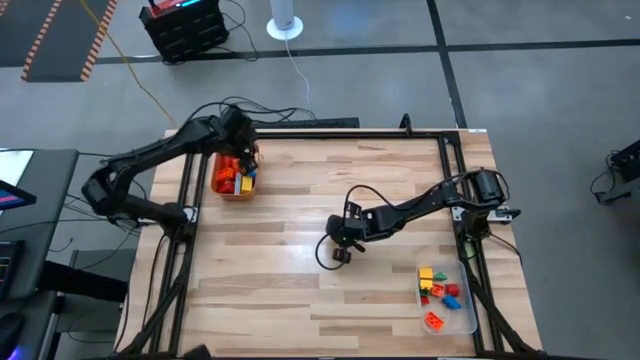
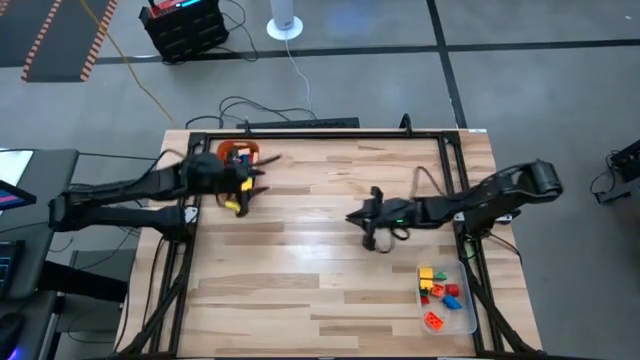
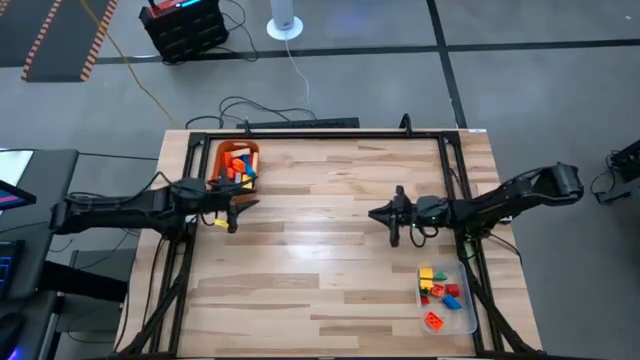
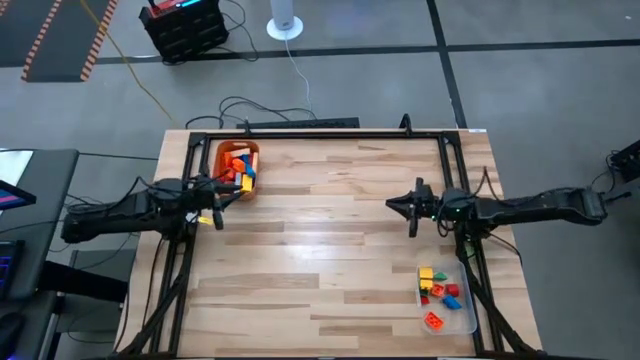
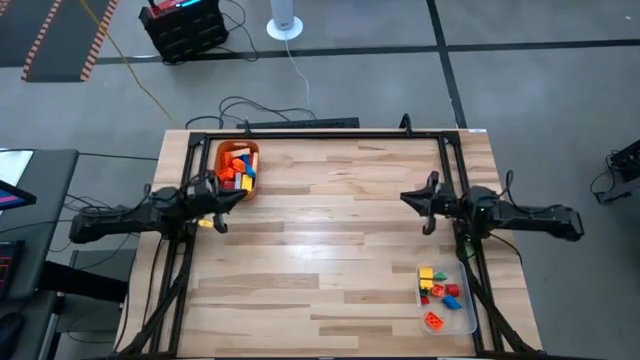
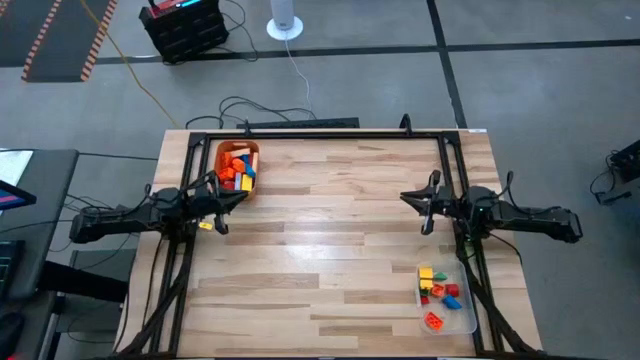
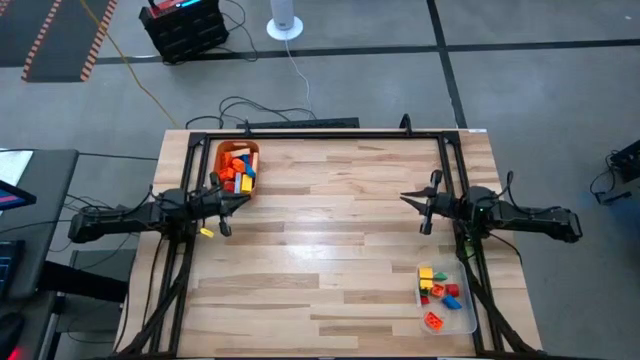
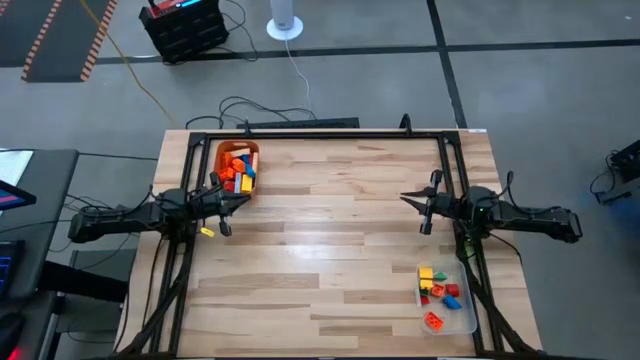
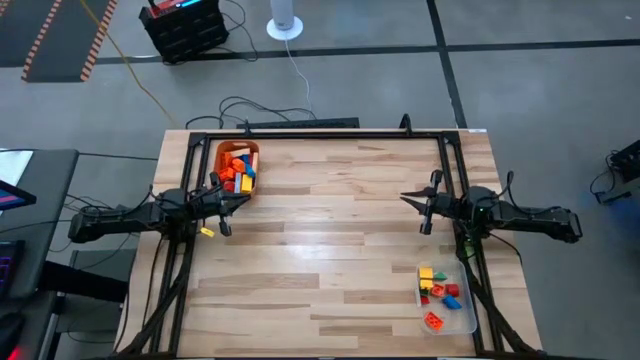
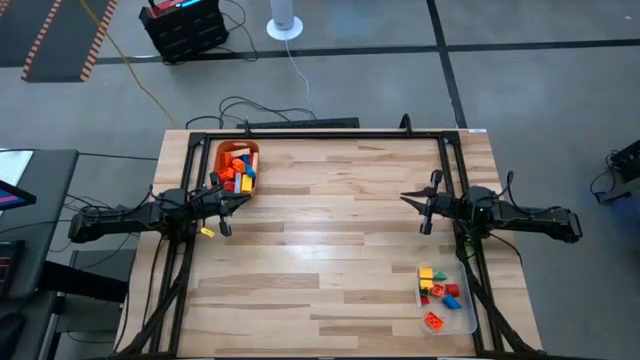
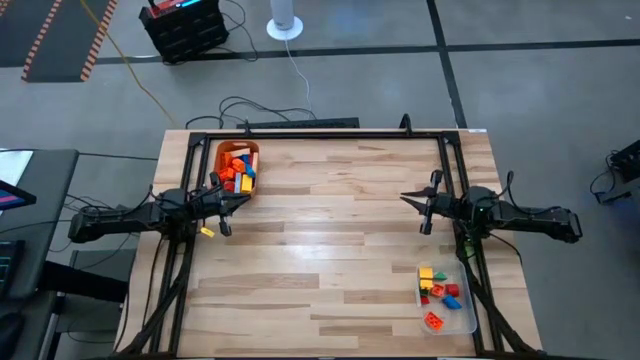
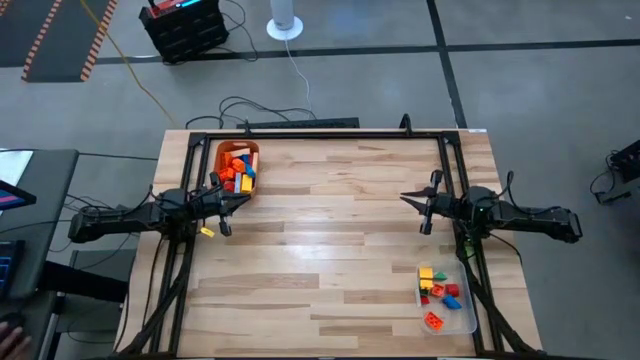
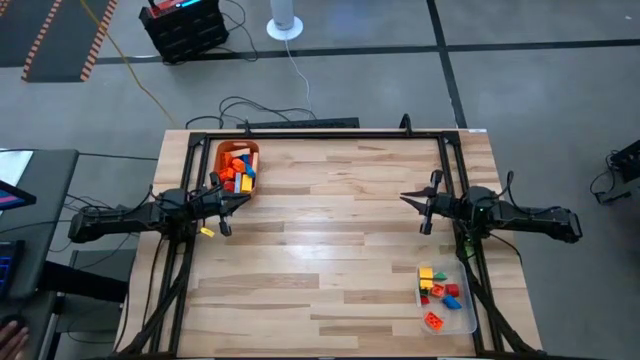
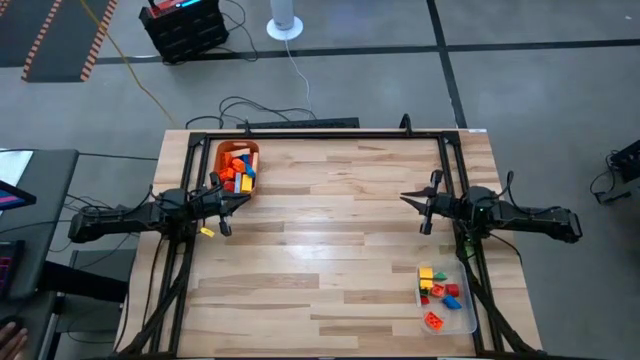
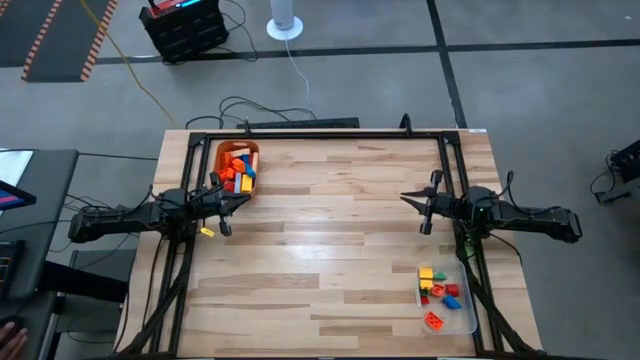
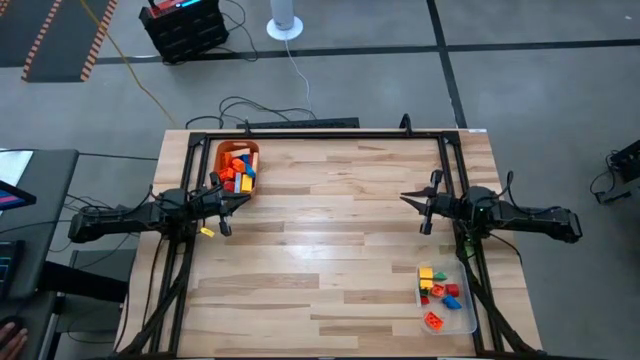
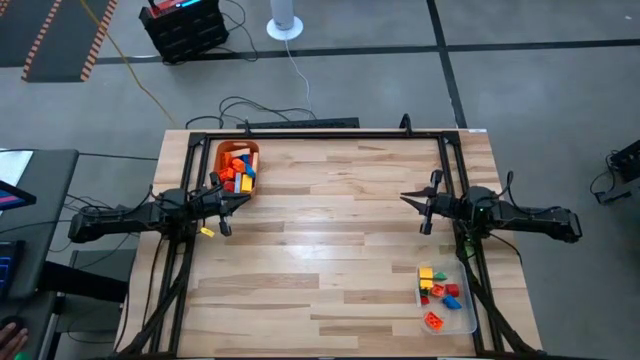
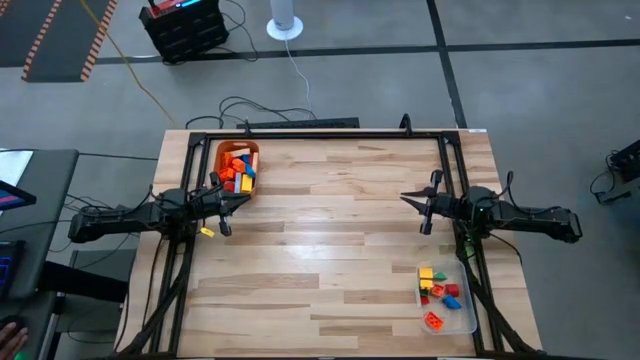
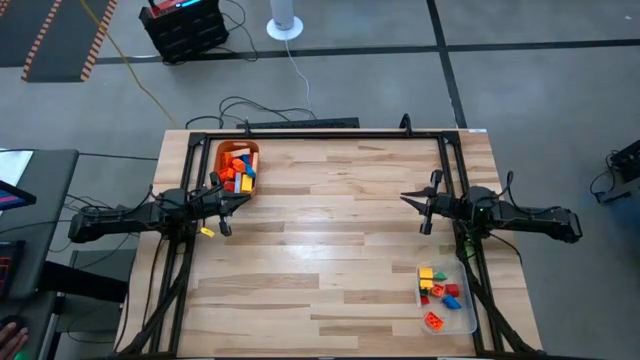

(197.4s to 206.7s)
Task: Sort blocks by size
Return to Home Position

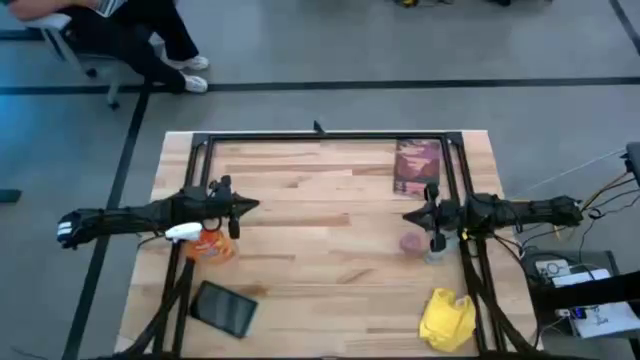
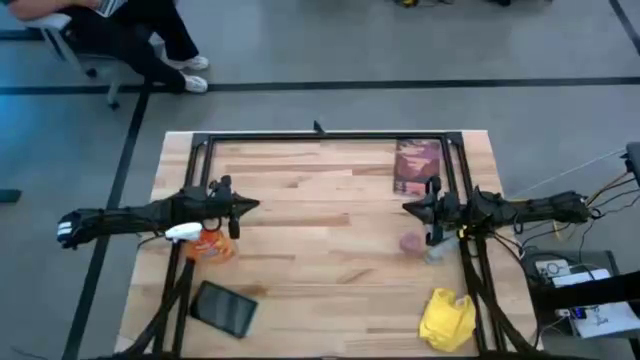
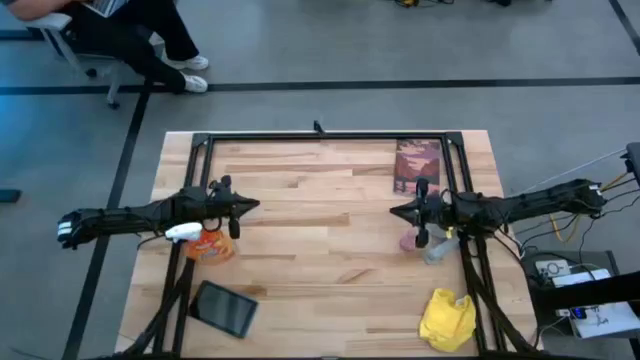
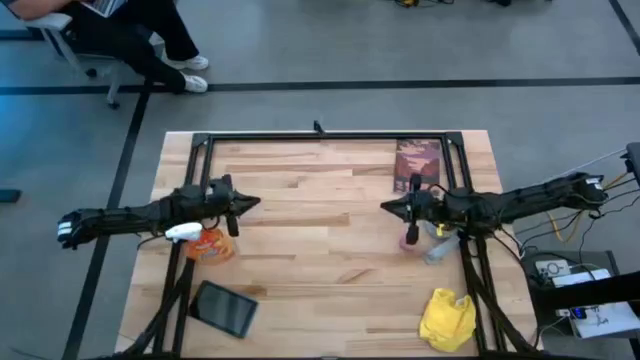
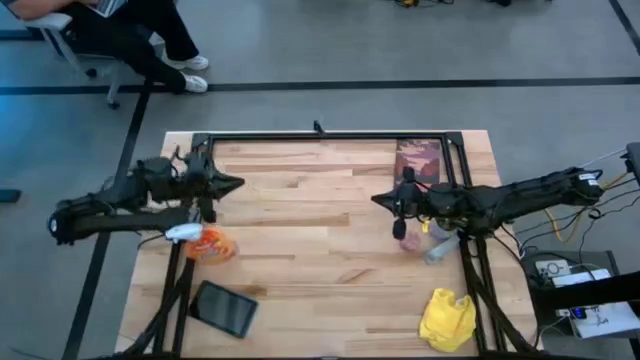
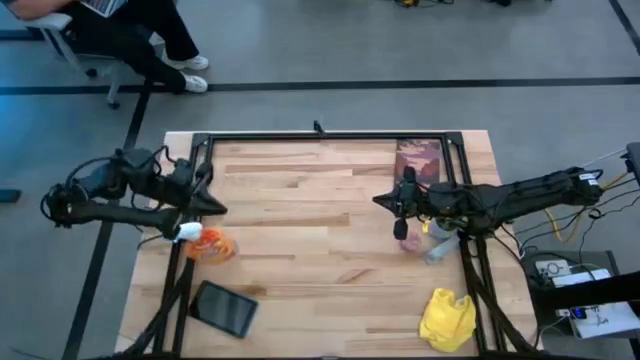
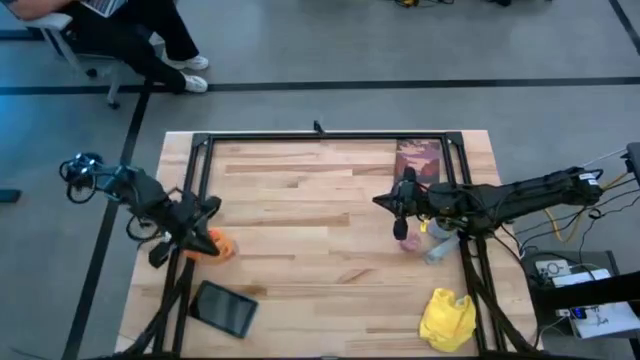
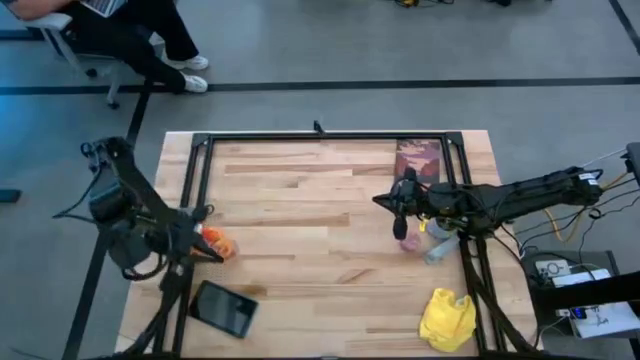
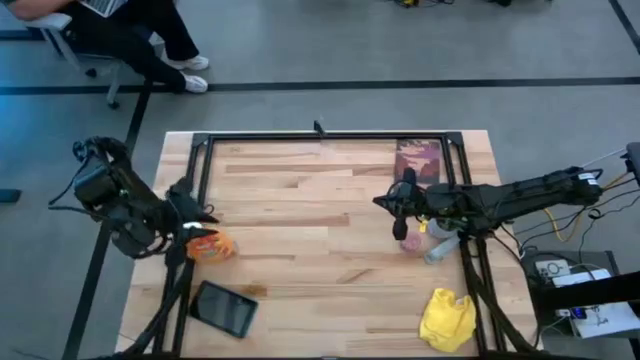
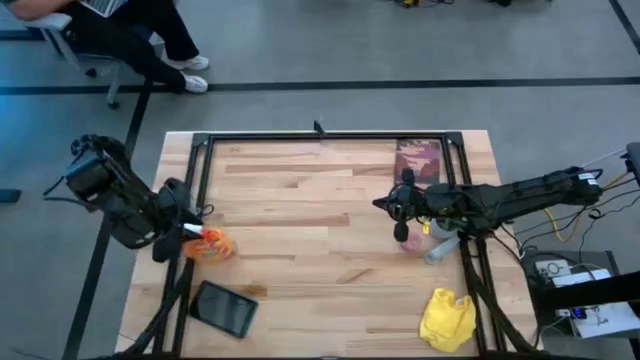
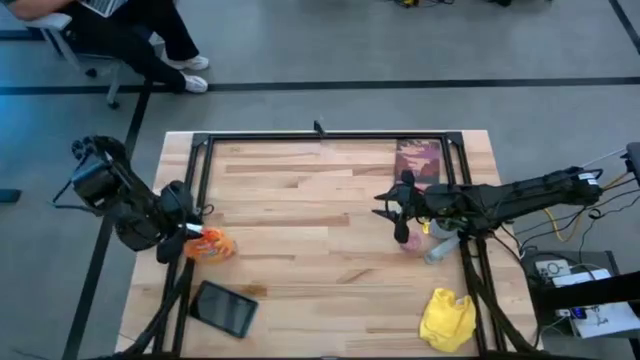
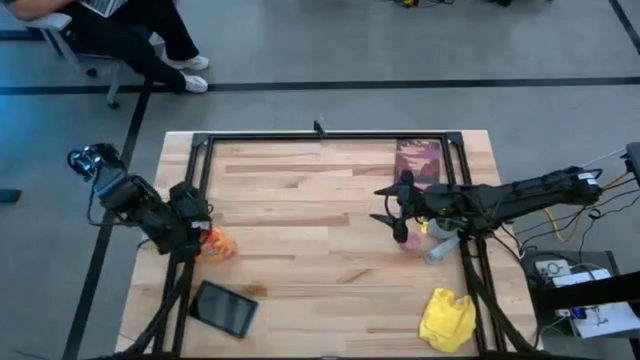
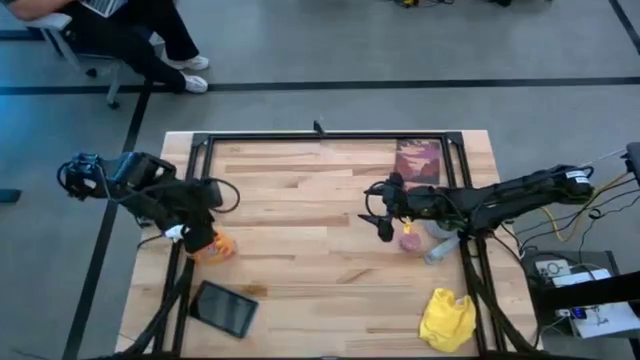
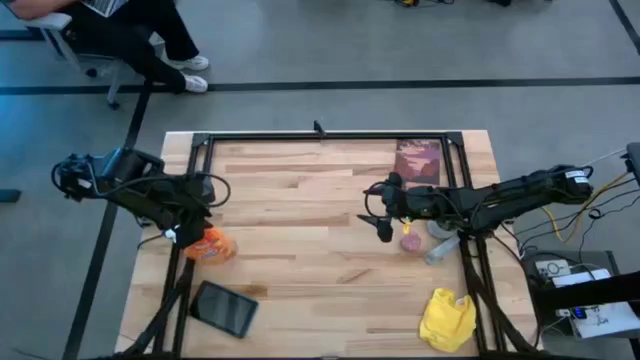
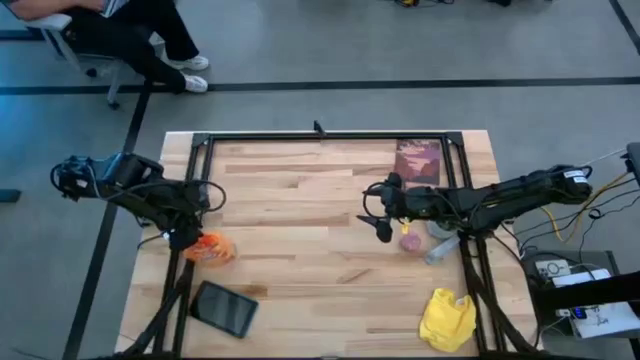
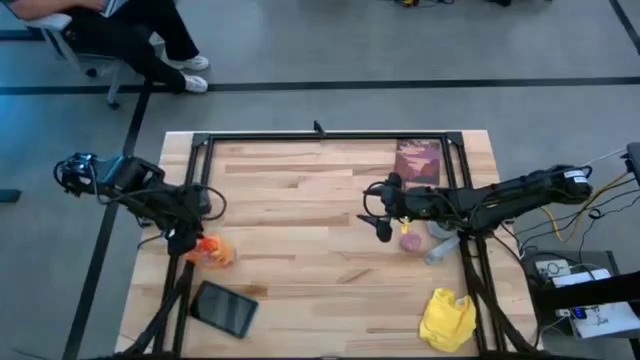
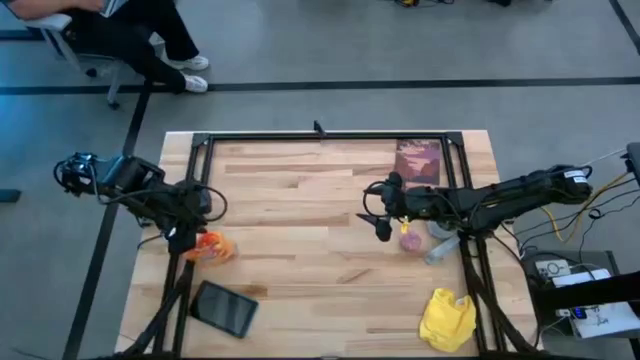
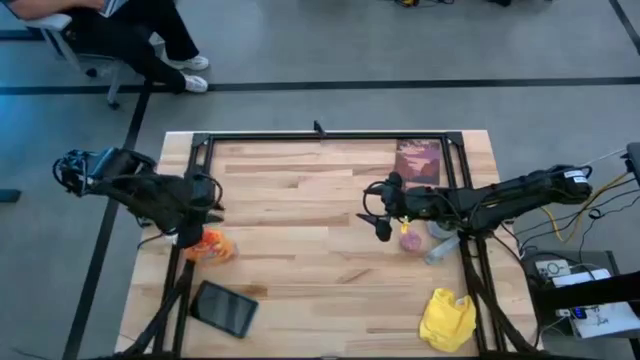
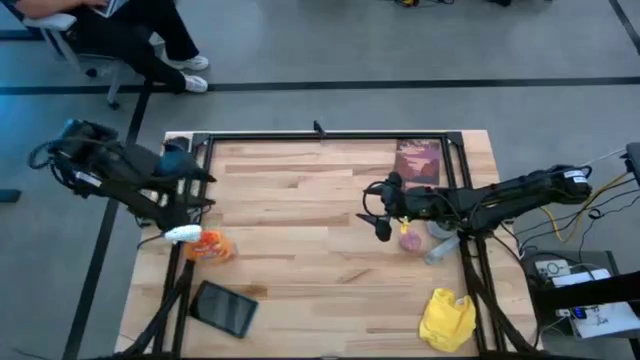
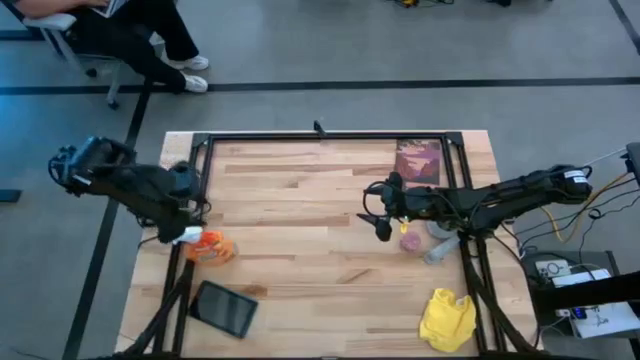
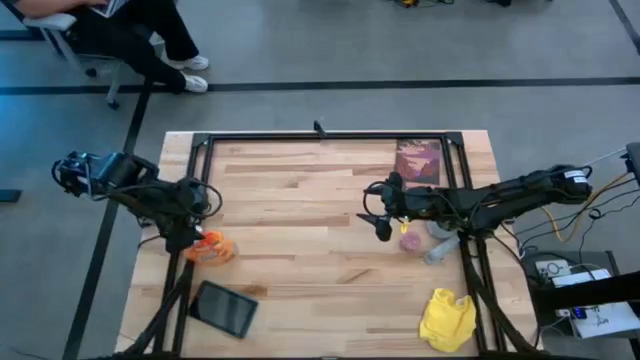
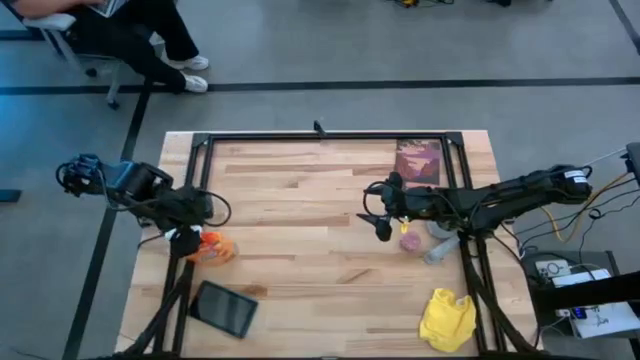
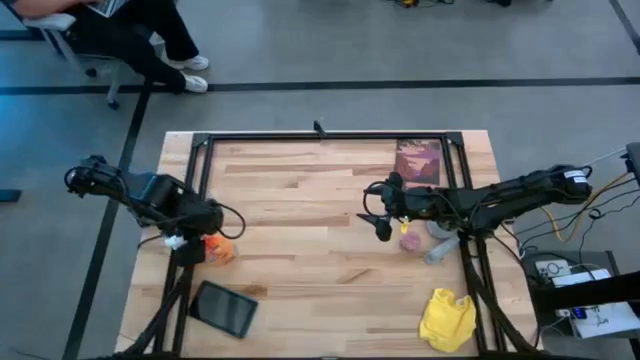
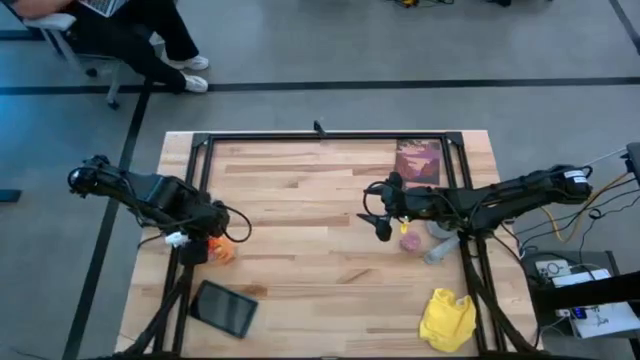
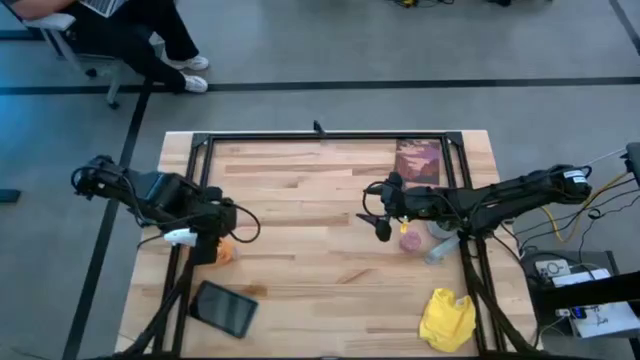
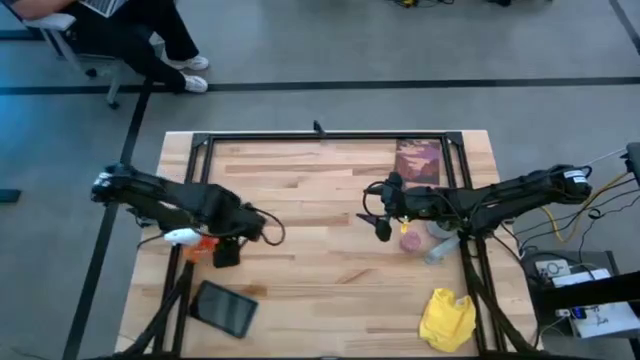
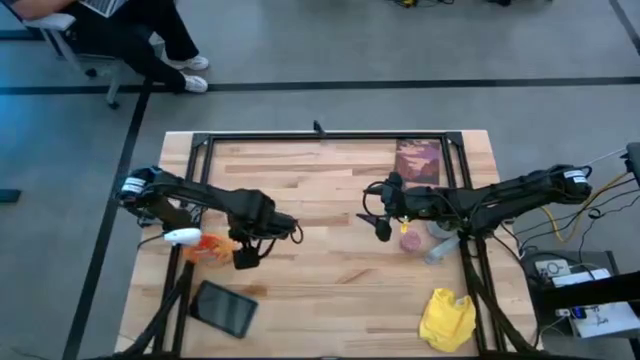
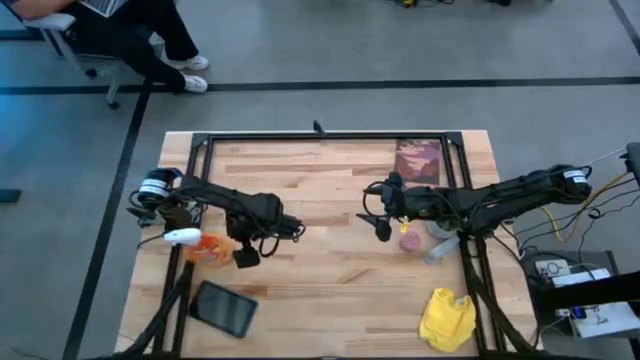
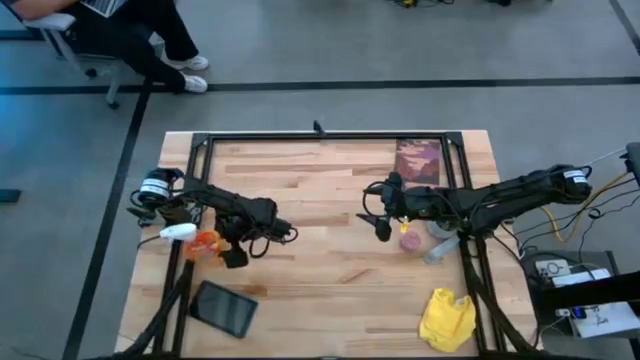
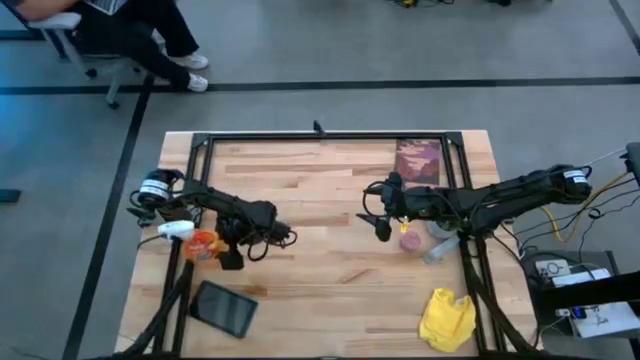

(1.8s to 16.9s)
Task: Apply microfiber cloth
Move the spray cleaning bottle to the center
